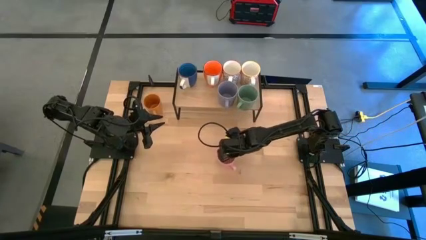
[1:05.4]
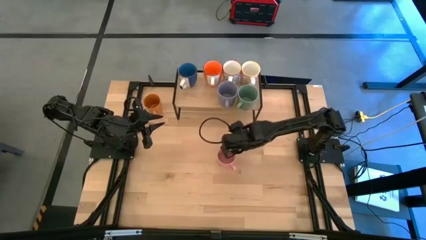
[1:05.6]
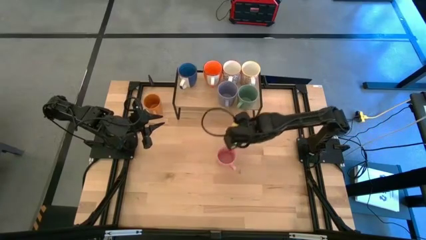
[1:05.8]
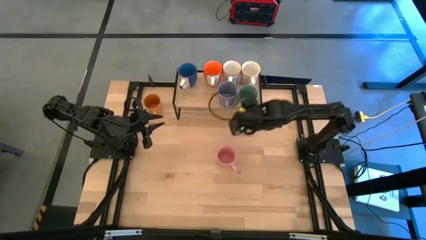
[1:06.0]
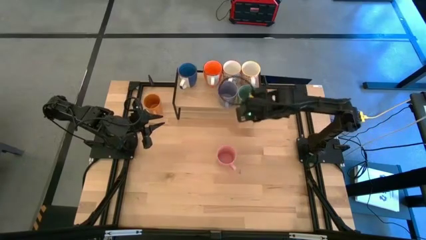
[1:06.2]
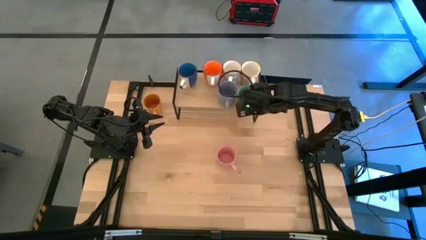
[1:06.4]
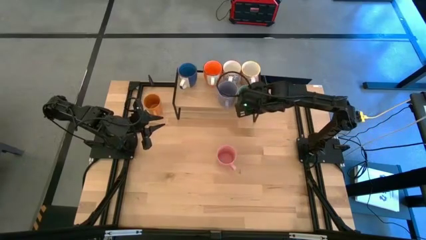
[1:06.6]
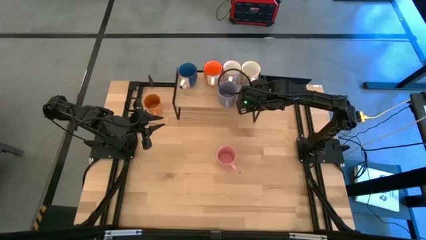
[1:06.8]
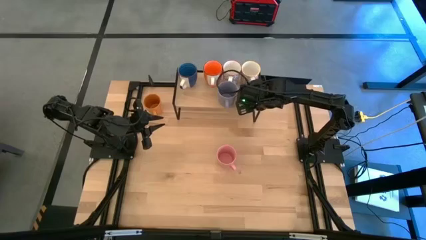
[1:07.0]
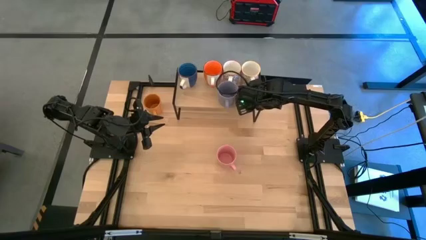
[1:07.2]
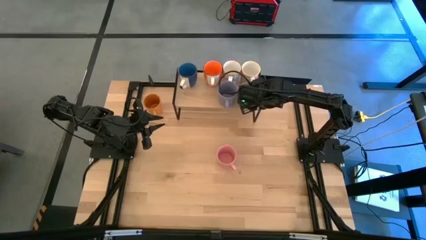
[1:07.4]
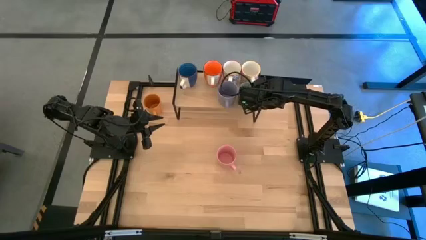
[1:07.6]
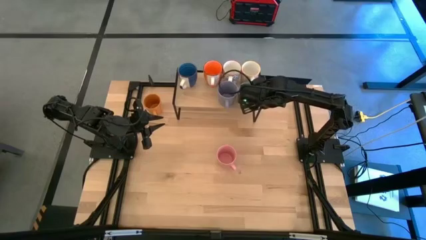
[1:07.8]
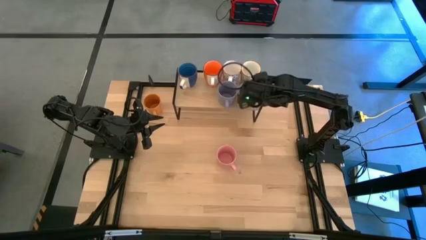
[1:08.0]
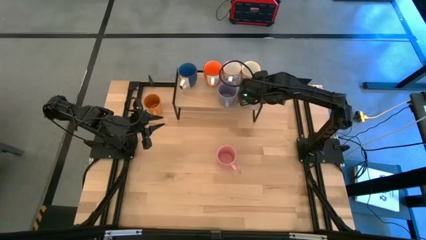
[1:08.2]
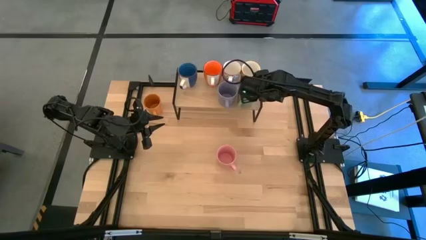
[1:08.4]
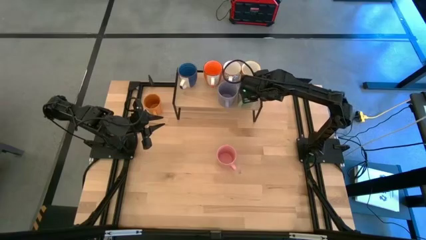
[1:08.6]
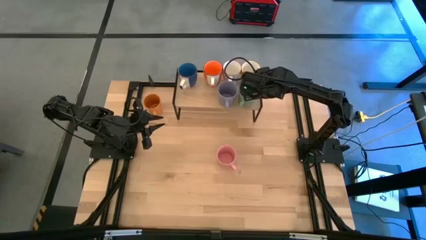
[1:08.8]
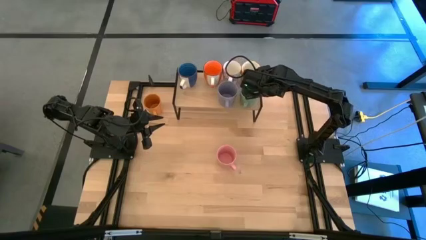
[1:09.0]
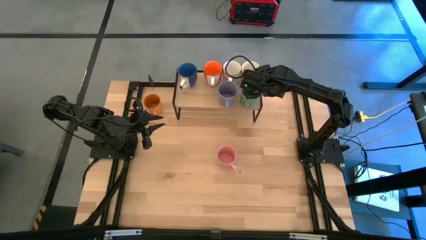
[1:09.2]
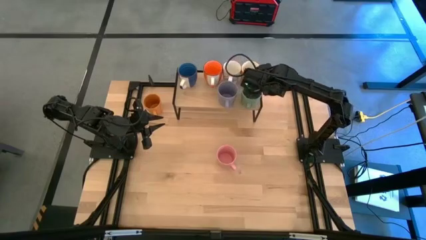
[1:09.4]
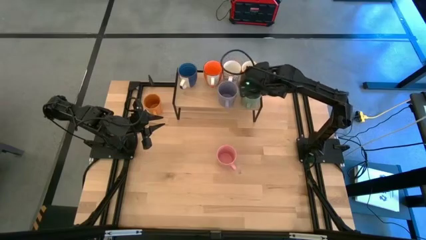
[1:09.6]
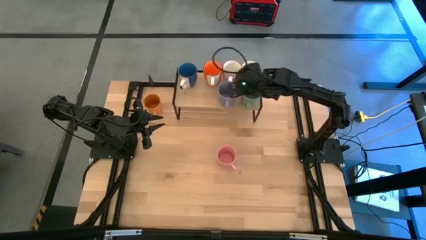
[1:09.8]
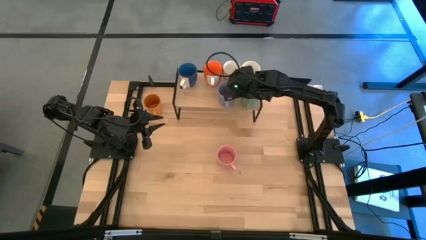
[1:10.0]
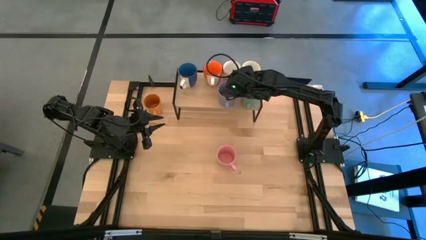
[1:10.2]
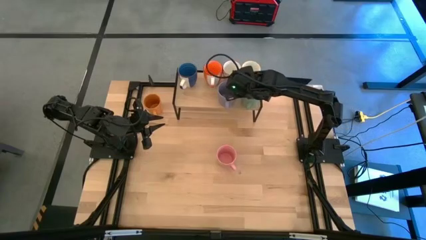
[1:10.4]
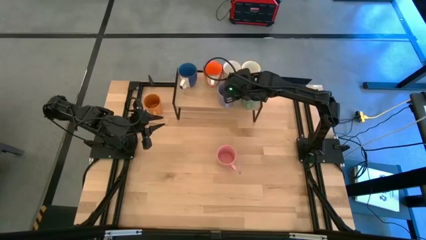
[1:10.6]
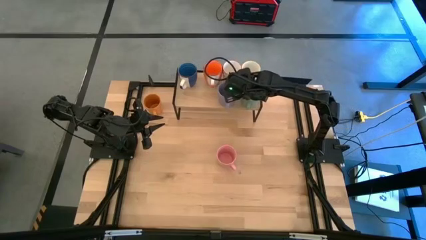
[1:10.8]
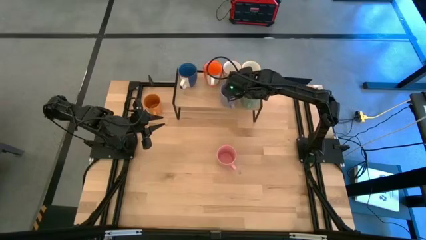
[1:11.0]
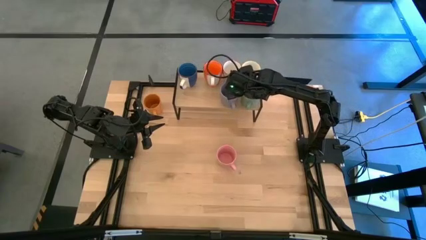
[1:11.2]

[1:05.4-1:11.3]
Task: Place coffee mugs
Adjust the mugs on the shelf

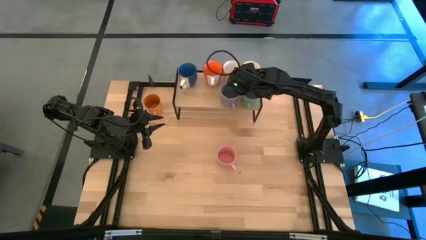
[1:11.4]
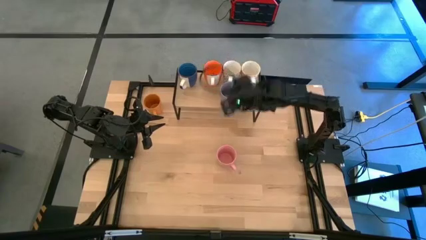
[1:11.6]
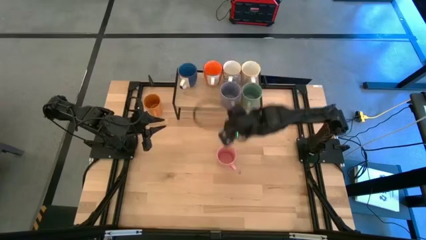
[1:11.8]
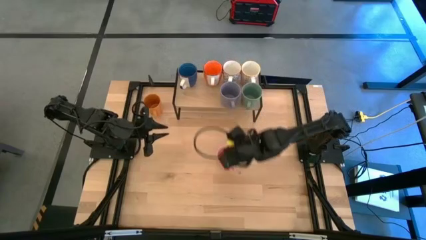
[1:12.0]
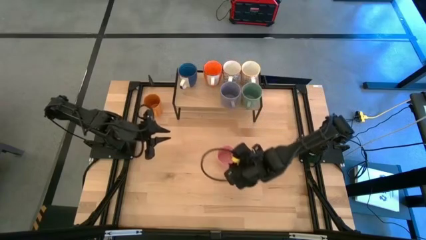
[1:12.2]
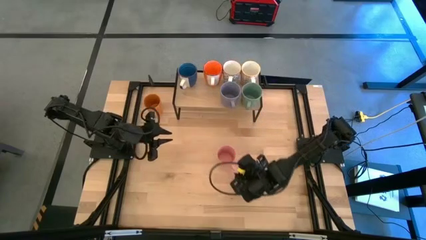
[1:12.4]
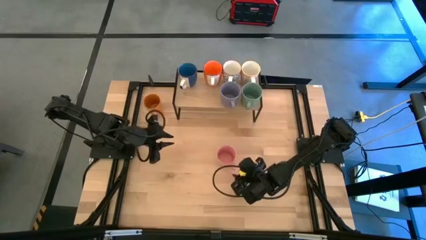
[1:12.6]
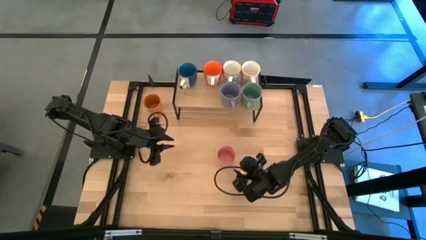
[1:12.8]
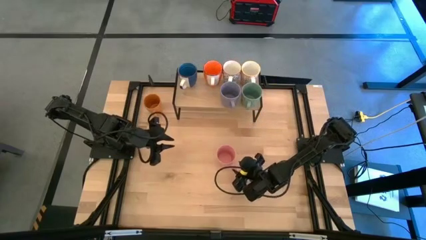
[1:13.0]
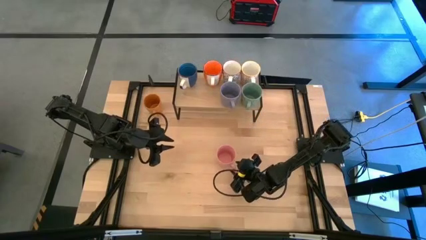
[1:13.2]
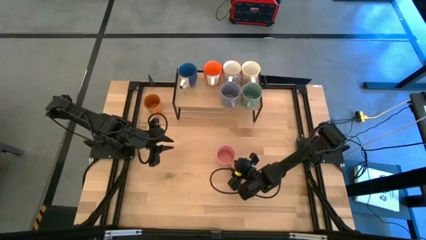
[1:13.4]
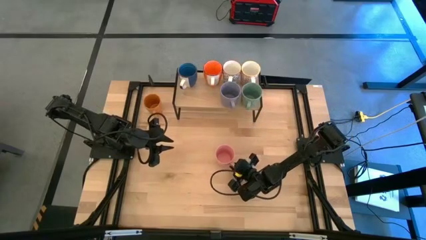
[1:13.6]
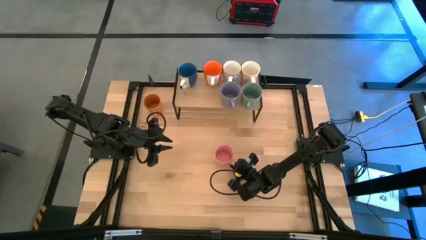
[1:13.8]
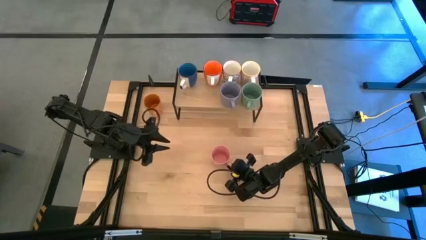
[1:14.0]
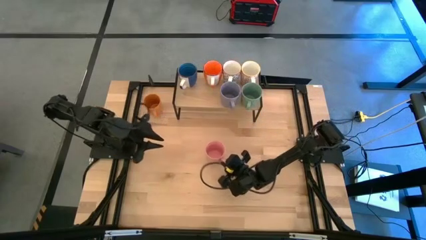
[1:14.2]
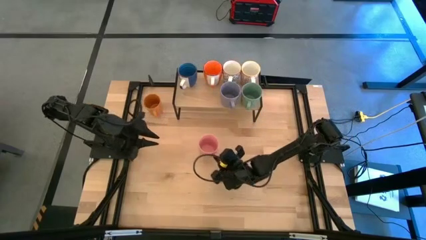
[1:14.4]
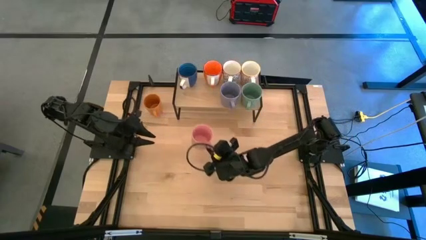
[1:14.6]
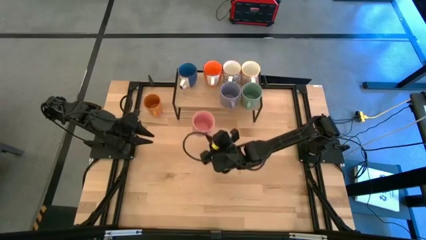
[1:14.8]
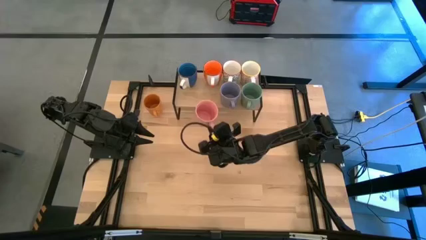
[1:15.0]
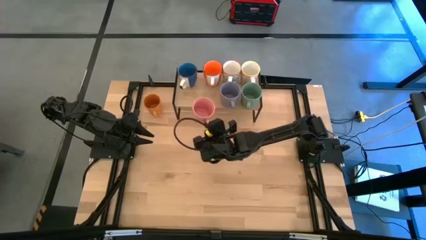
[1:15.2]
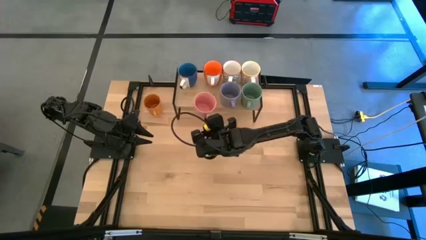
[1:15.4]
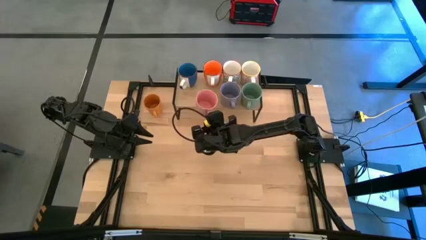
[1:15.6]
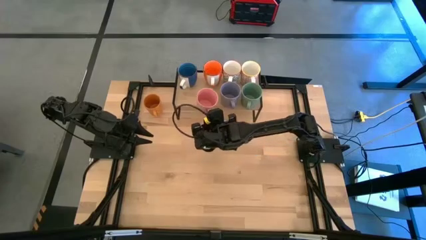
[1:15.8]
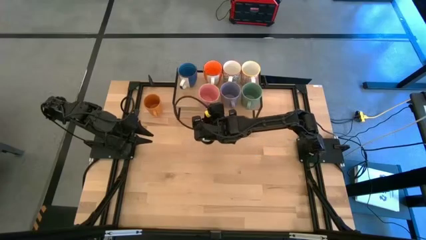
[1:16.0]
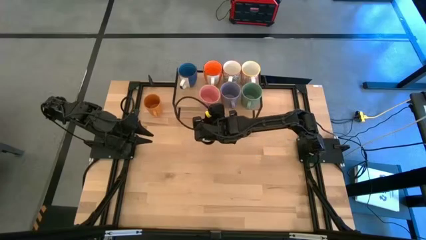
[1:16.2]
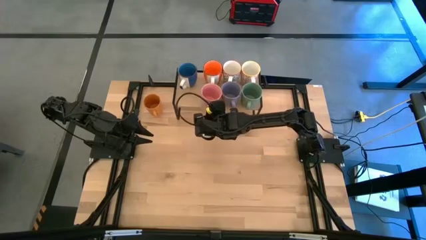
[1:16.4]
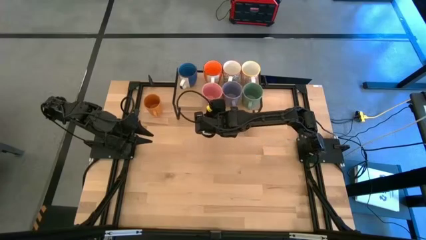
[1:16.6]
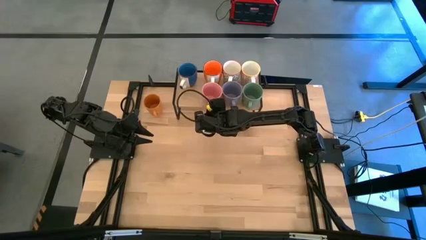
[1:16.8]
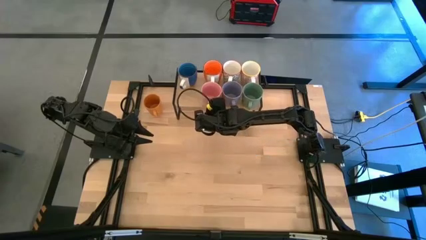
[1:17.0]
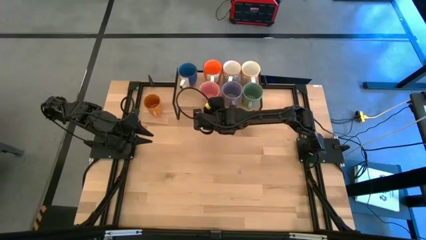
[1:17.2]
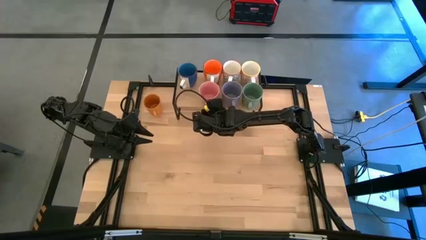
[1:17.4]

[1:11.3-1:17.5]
Put the pink mug on the shelf

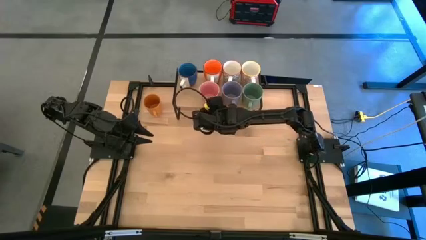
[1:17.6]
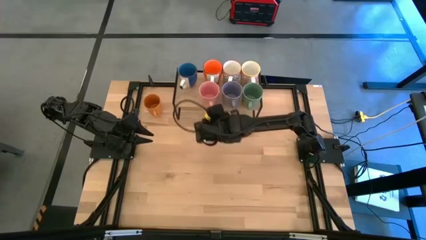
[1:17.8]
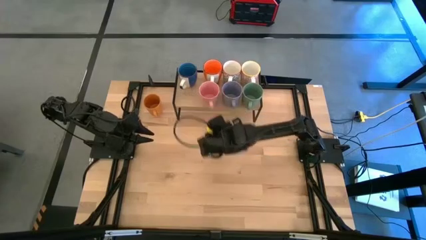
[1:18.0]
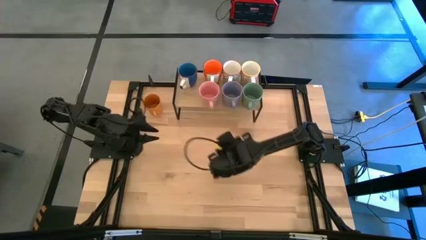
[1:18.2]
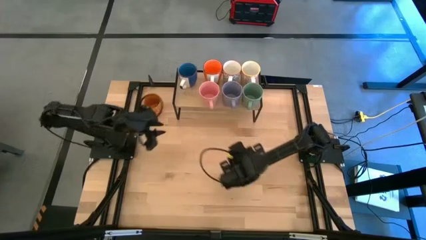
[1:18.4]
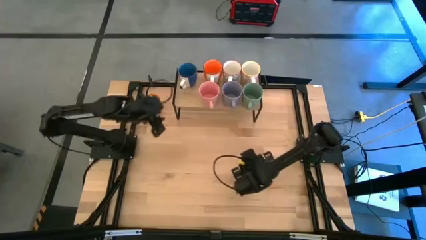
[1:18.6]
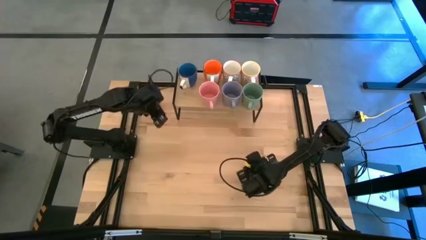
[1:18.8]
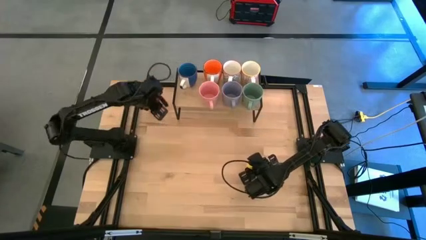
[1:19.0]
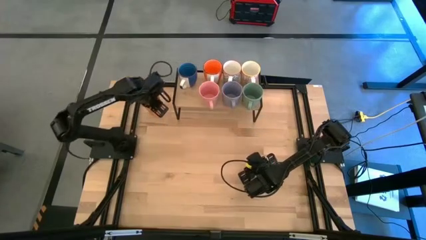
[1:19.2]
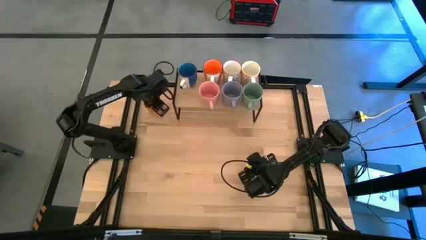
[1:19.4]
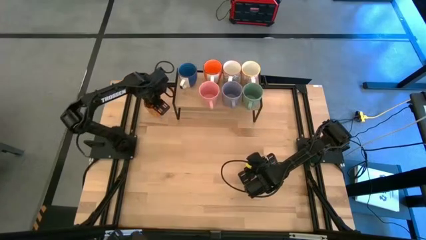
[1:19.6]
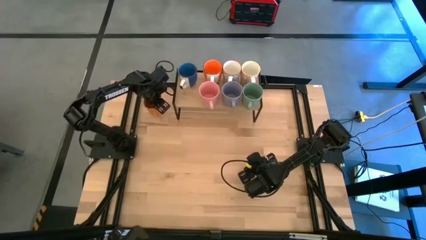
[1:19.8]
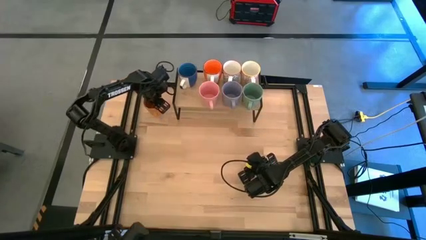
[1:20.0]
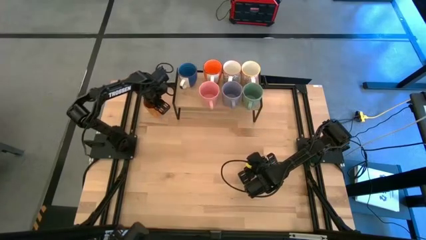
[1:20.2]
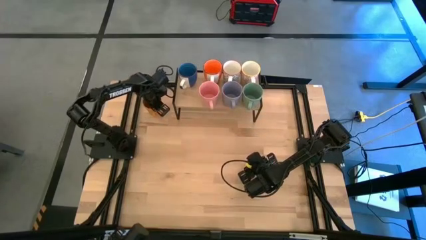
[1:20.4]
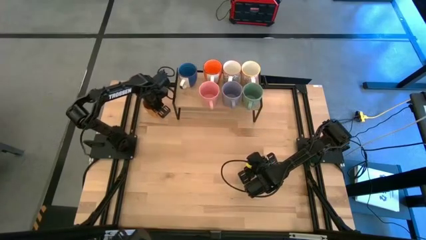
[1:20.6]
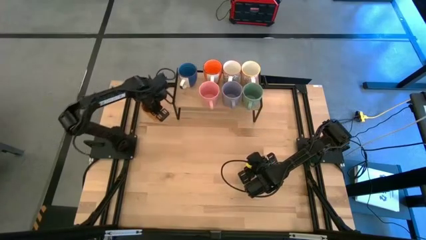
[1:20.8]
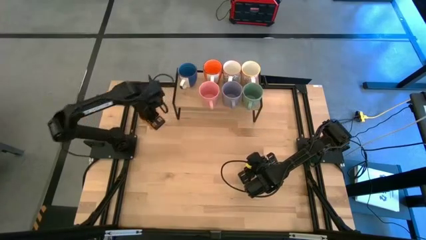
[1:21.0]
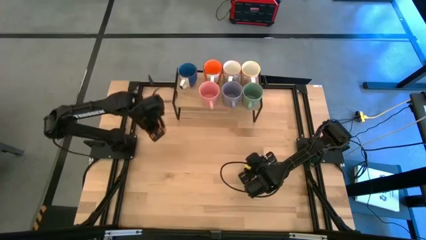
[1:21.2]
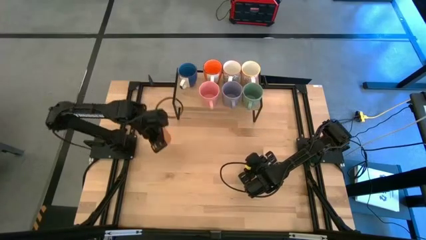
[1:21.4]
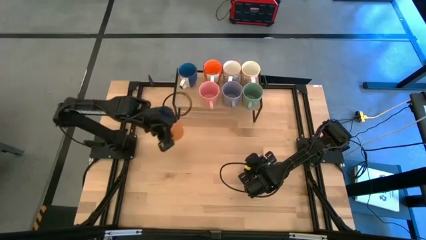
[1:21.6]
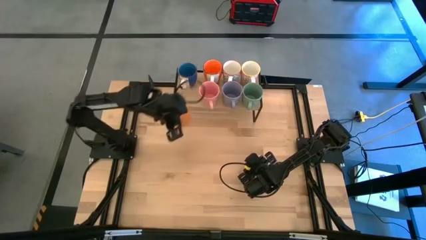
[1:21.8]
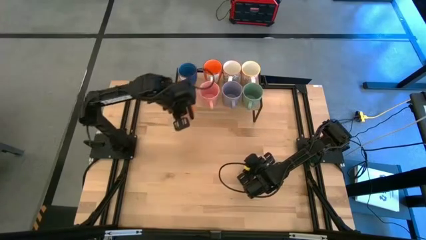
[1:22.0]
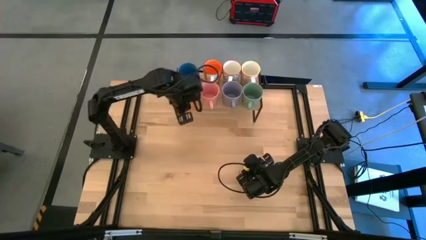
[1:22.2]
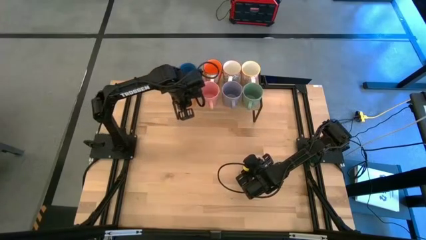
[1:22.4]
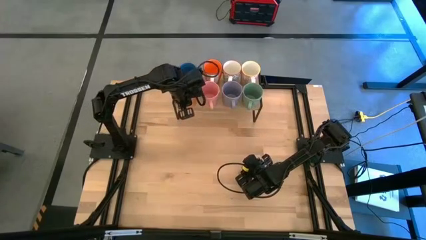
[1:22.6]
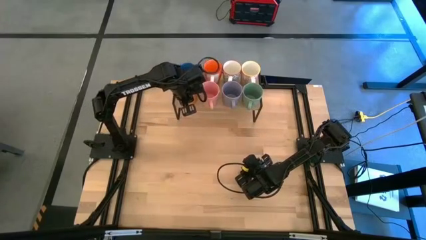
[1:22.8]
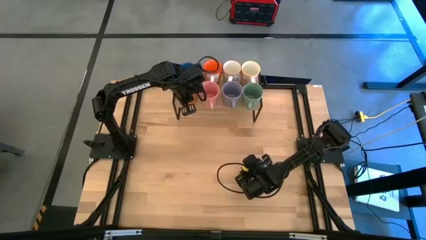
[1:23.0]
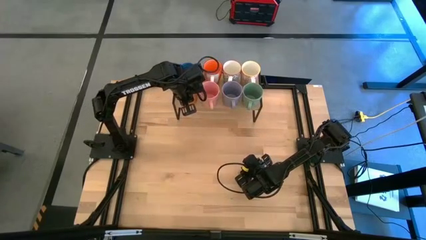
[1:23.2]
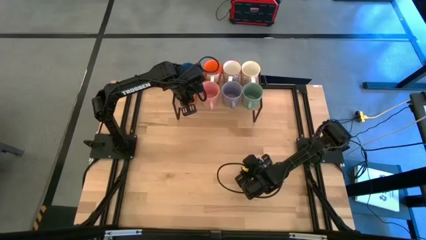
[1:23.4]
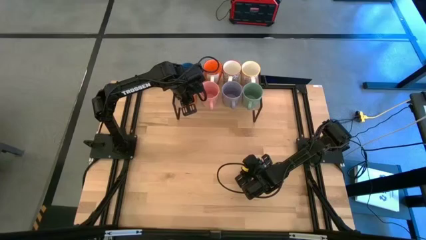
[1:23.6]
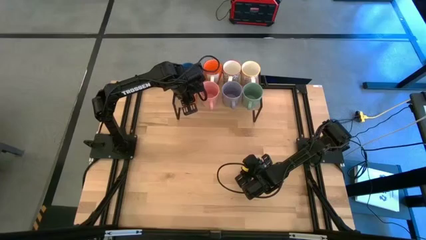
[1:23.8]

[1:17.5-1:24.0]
Put the orange mug on the shelf
